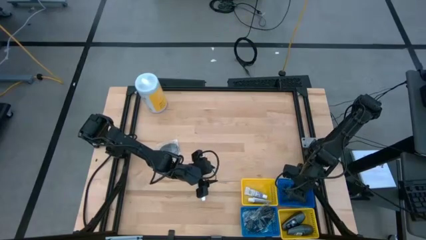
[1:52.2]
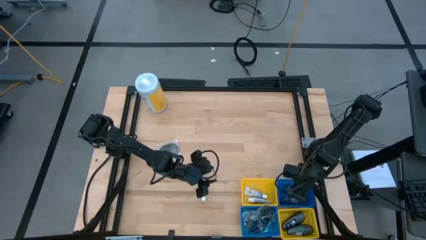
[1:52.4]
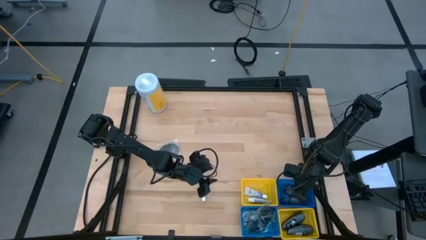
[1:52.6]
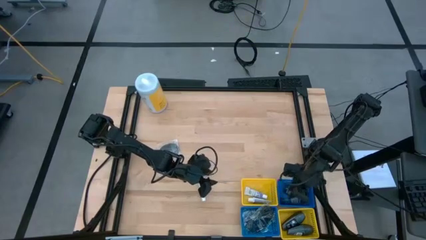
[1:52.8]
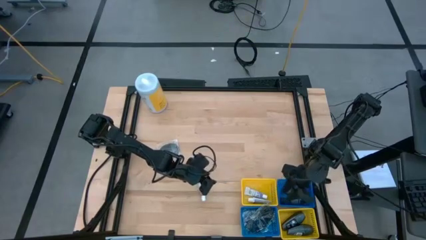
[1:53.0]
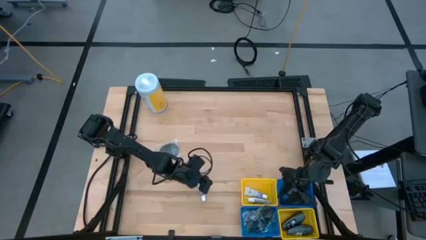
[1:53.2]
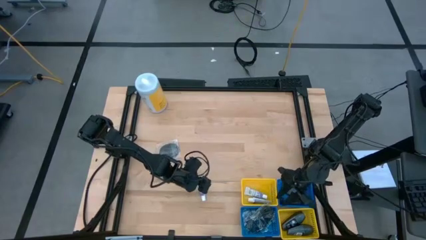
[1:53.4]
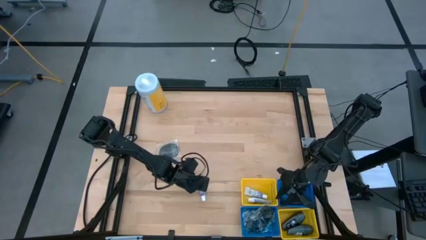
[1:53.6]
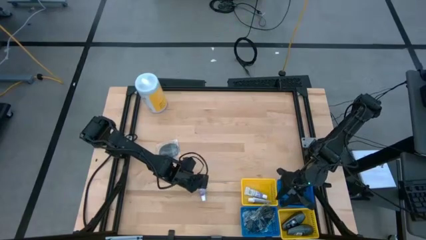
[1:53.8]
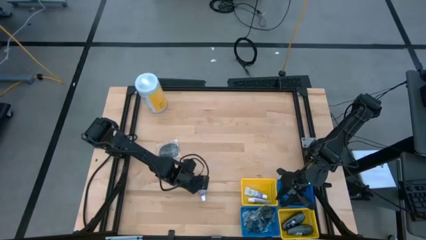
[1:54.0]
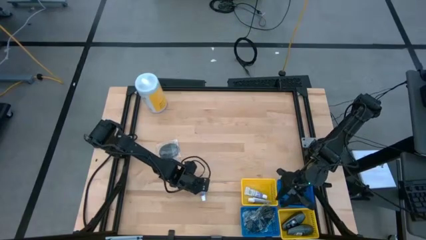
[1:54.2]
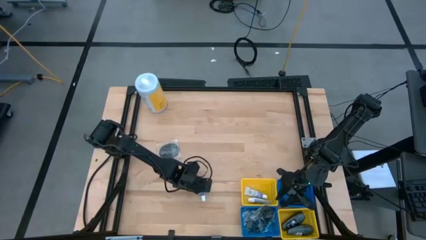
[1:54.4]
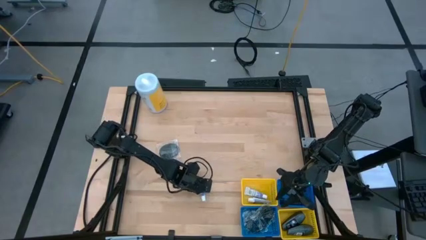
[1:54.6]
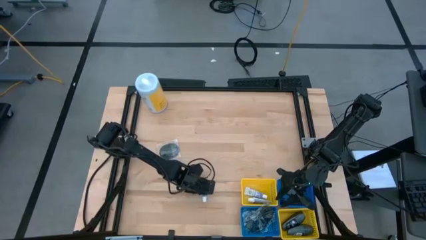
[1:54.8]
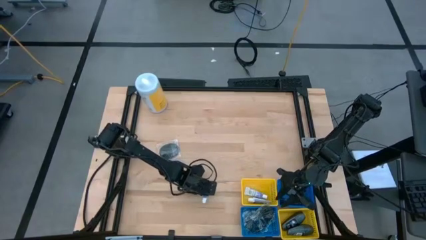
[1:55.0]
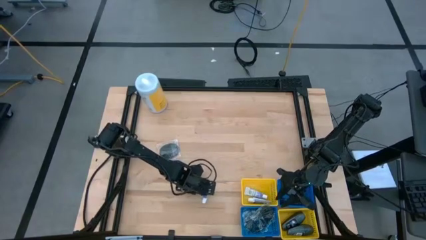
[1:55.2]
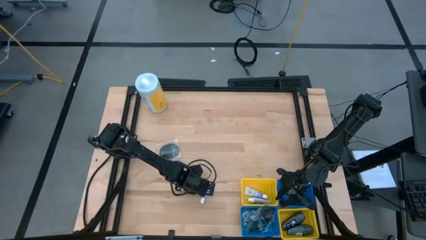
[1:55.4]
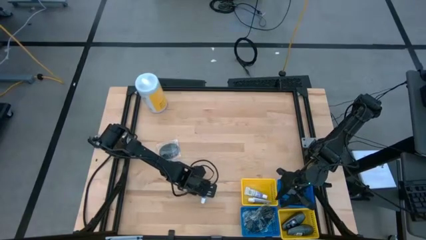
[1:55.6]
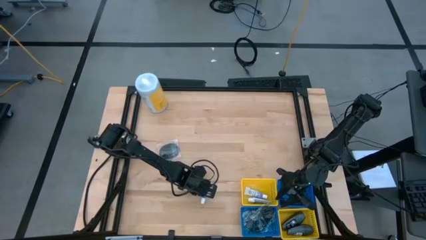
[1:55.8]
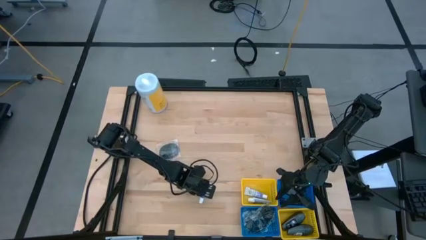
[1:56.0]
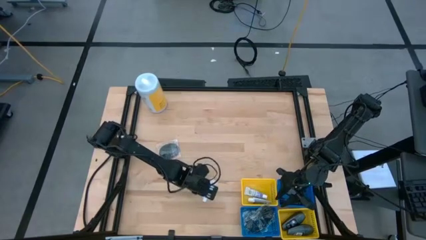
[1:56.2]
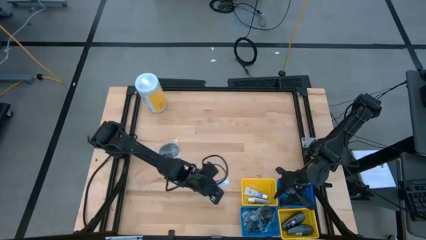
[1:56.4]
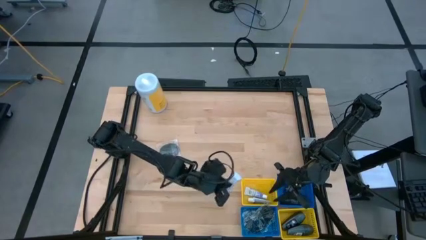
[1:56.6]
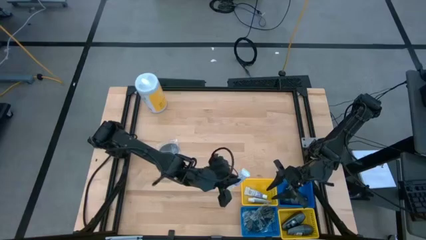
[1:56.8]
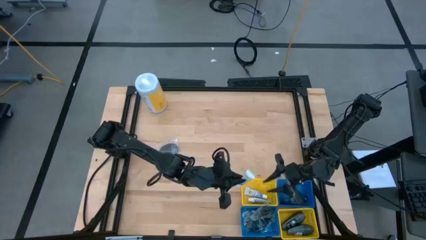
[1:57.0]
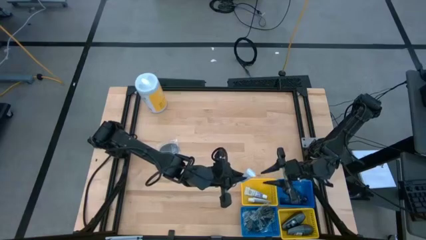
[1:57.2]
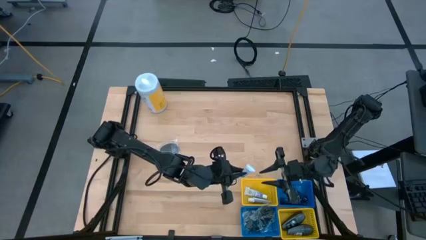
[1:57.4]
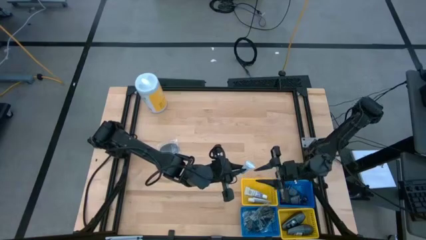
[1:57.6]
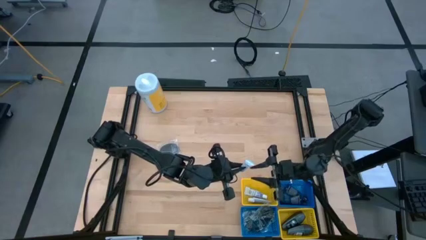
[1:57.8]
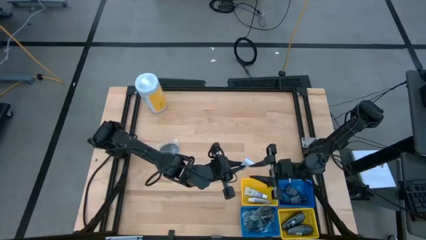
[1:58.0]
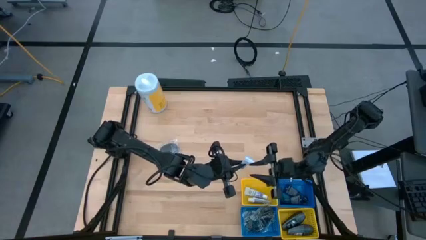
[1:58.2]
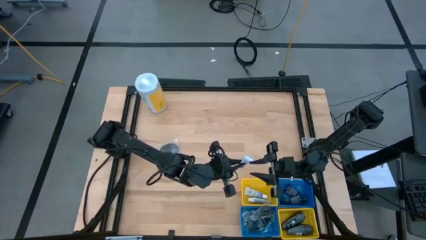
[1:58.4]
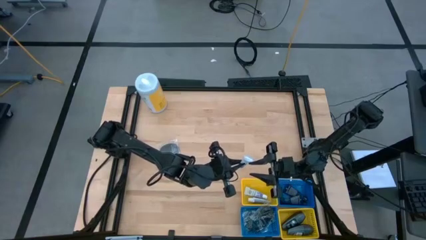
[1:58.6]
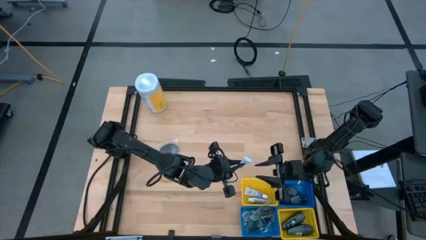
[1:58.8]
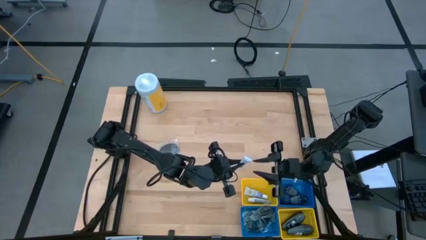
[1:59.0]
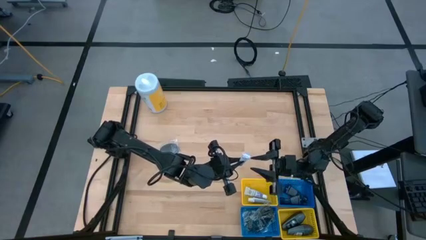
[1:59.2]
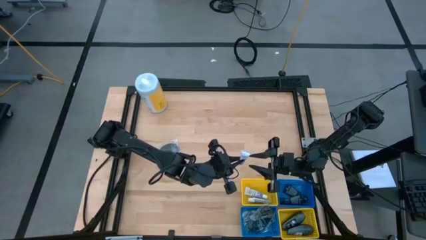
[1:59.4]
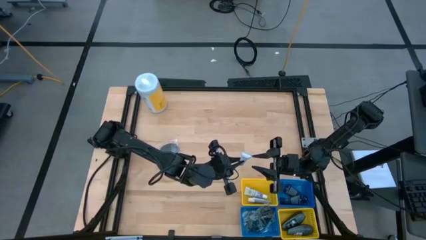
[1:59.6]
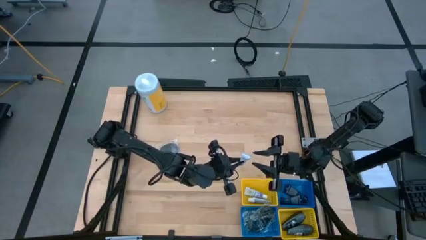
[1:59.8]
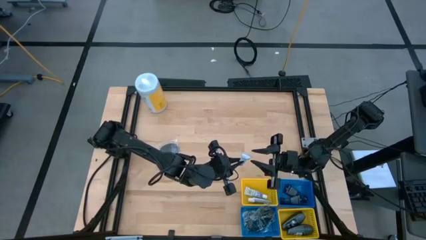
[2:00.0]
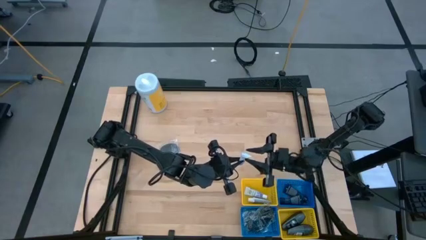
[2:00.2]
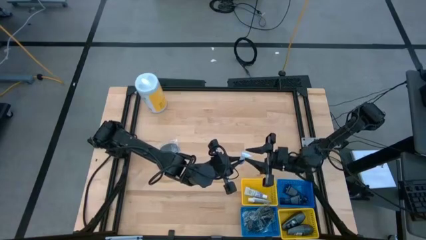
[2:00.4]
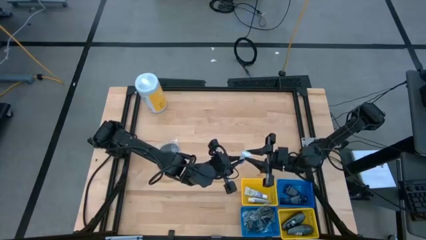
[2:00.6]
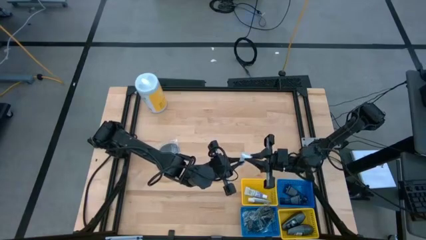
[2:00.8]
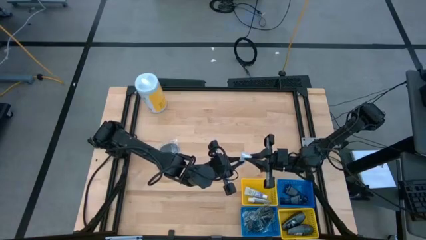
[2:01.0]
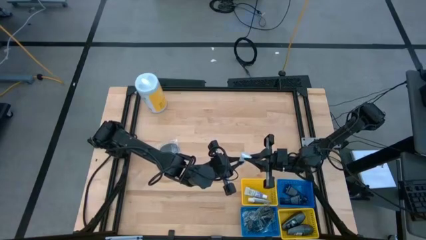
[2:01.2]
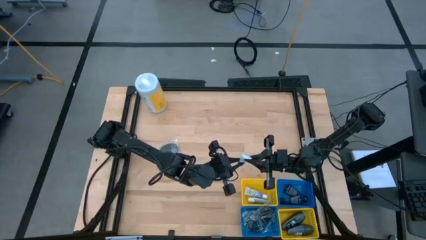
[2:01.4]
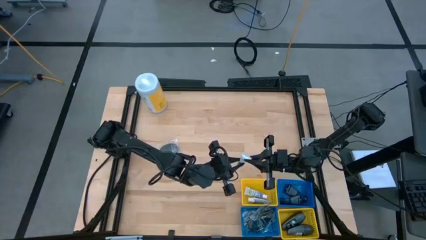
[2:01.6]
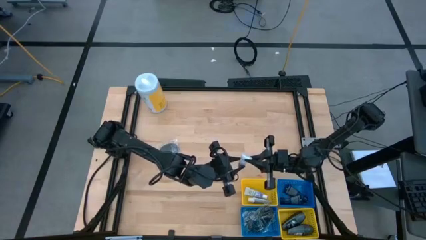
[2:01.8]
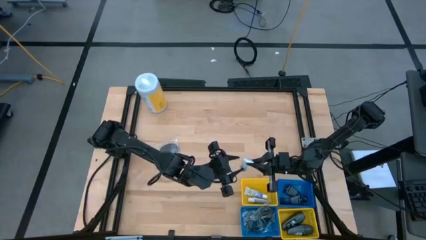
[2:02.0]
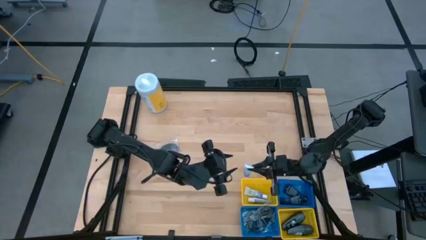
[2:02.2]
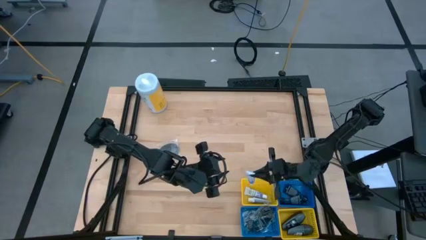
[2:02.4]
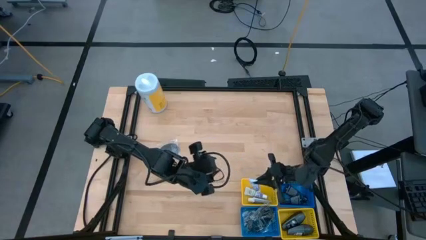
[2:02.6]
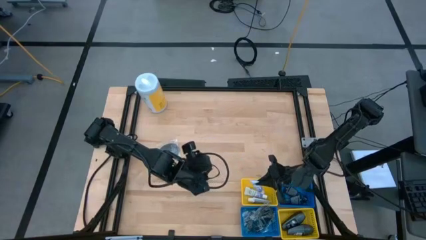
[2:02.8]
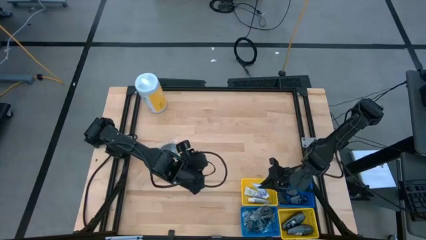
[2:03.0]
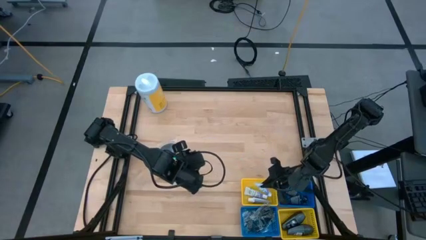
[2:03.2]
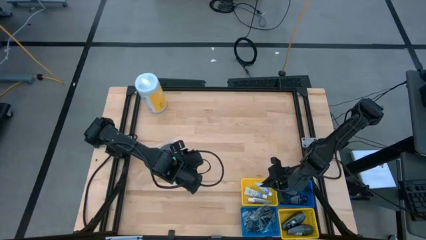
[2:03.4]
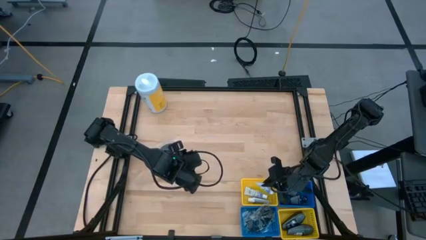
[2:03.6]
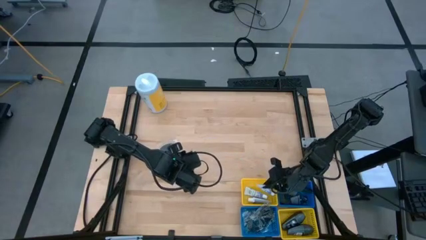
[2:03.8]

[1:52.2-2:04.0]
Task: Pick & Place Travel size toiletries
Put the white toothpaste into the top yellow bin

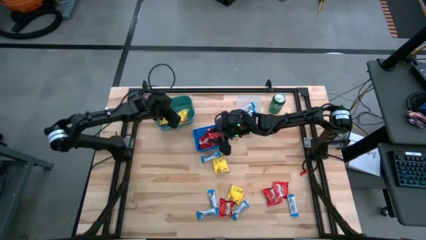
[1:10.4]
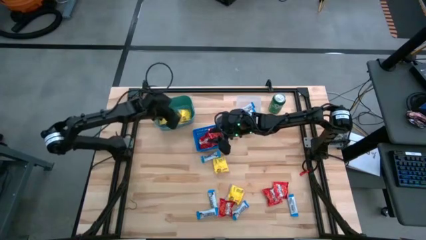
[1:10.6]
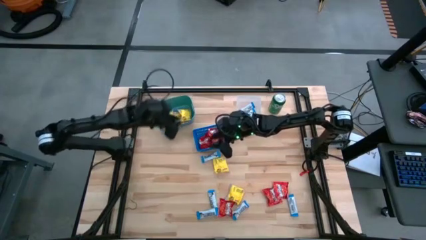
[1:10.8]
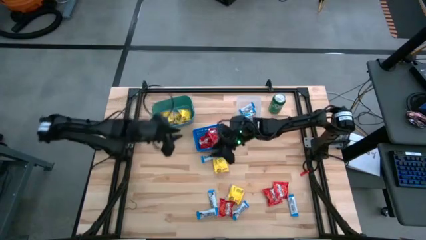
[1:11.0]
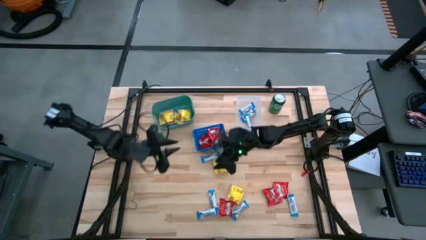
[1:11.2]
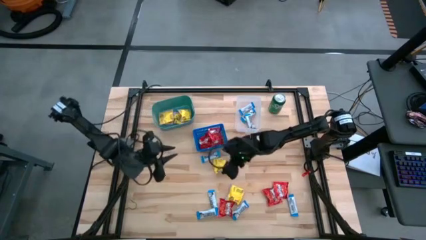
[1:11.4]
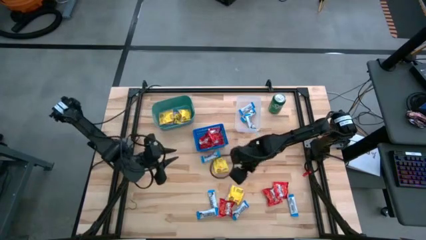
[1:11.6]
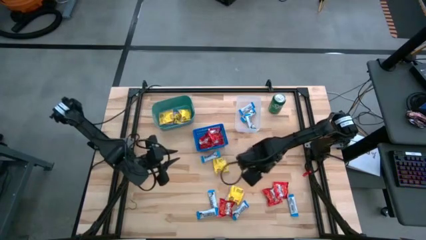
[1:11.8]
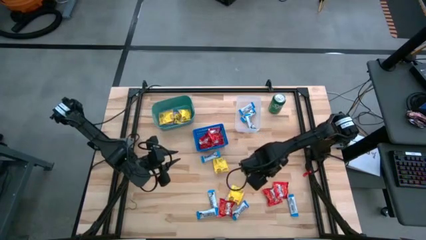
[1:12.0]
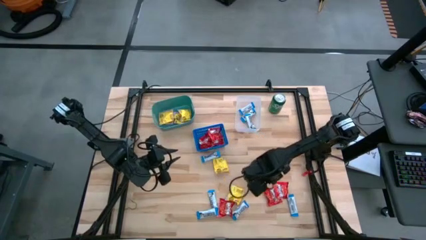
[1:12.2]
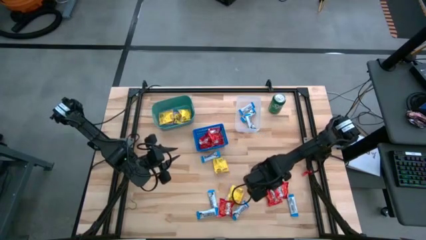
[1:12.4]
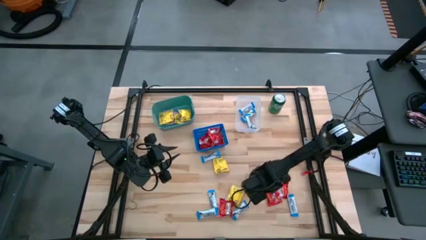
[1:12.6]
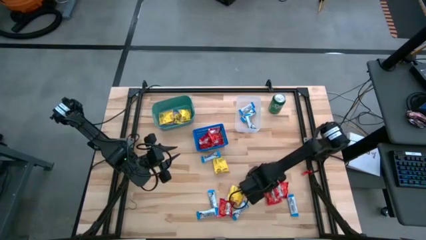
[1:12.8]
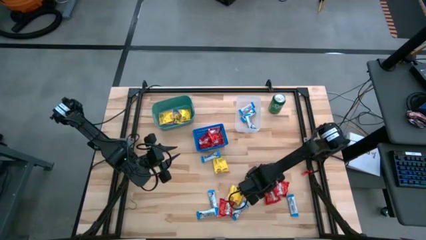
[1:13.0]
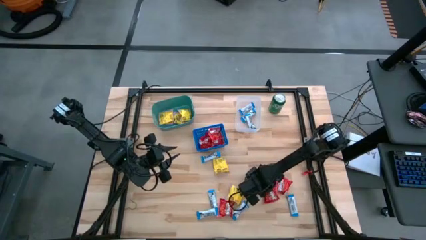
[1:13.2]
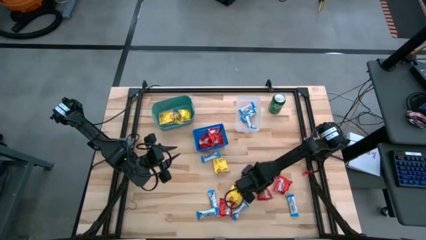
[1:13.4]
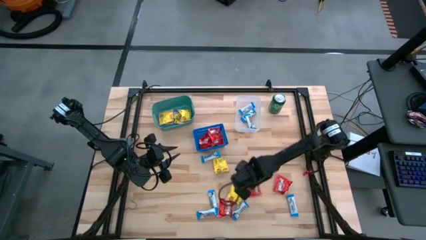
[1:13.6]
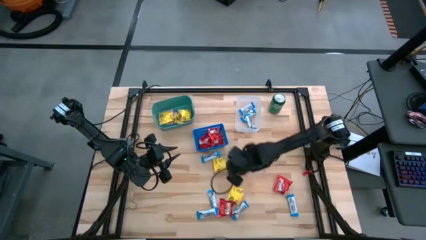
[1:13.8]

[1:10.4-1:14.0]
Task: Sort candy
Put the skittles candy into the blue basket

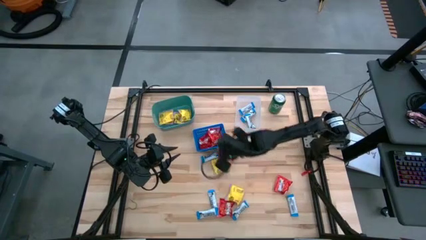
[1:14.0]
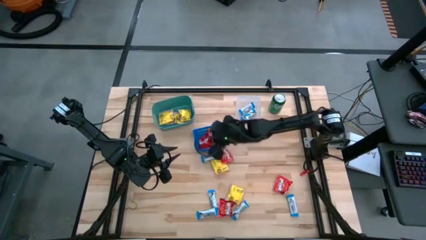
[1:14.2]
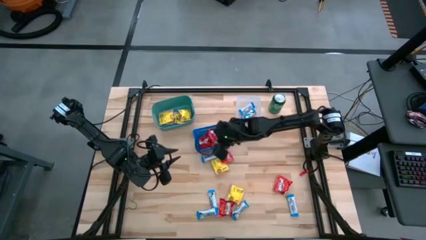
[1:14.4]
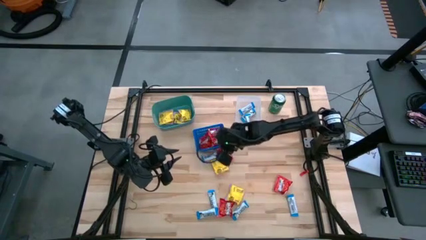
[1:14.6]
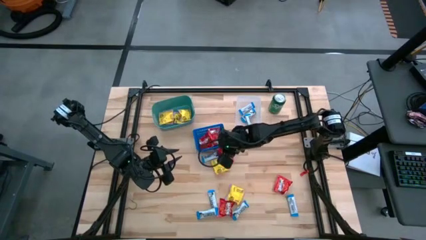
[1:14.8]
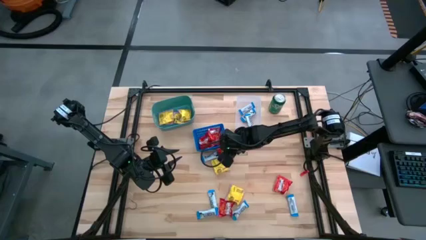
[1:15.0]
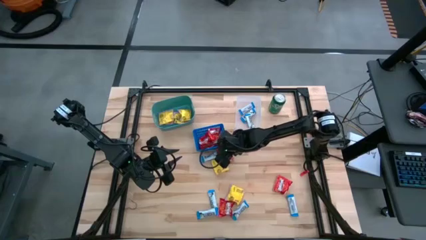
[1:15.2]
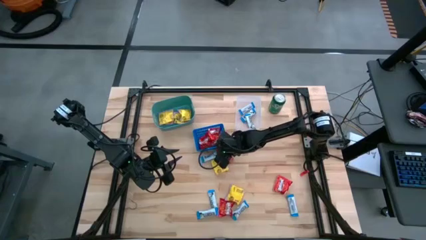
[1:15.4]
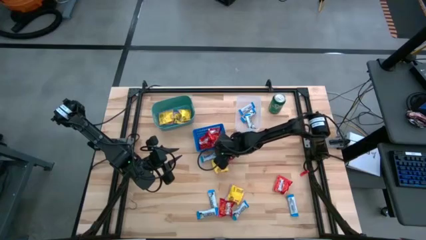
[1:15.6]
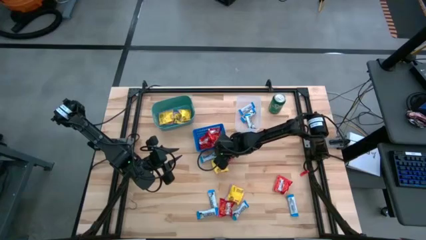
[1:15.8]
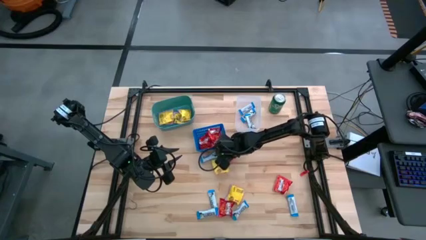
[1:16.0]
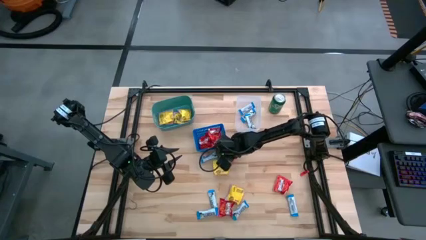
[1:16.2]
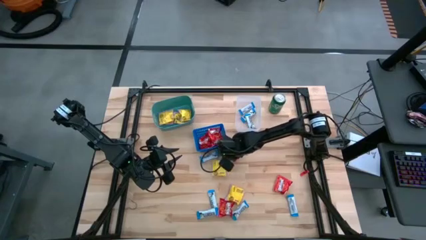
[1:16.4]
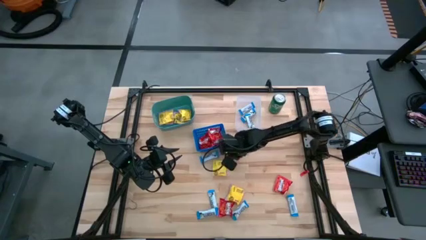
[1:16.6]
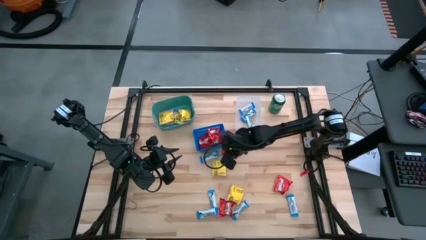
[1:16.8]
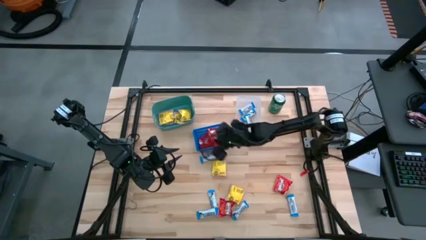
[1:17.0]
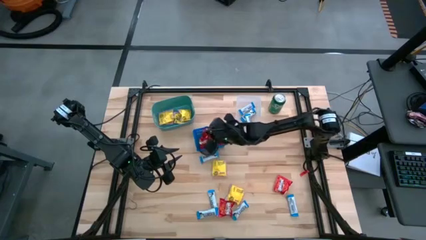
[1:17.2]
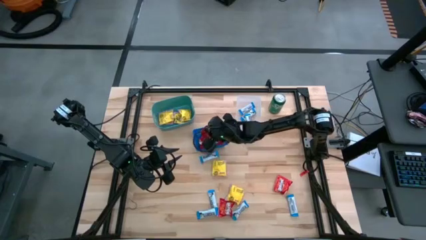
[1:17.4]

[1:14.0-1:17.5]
Put the skittles candy into the blue basket
